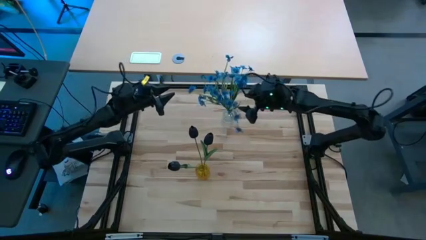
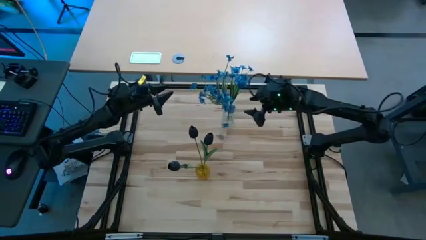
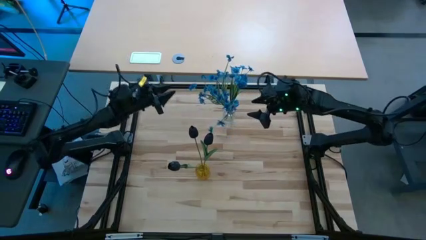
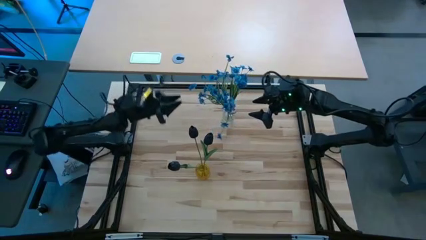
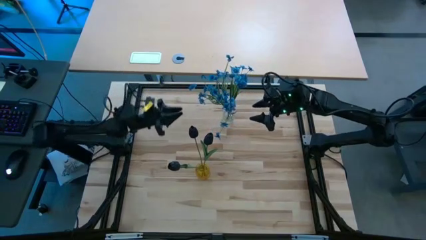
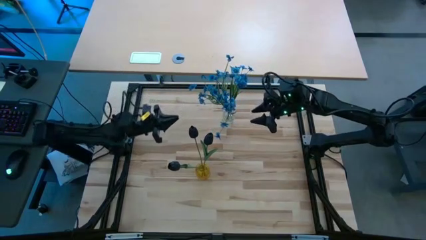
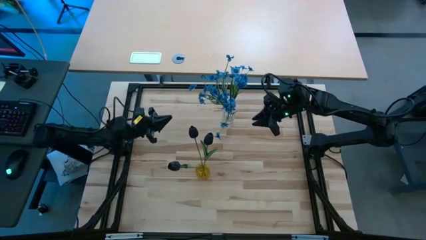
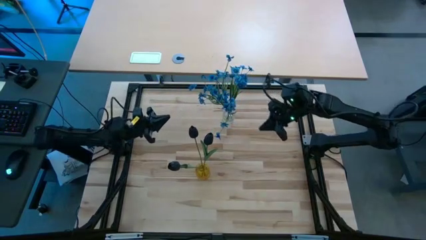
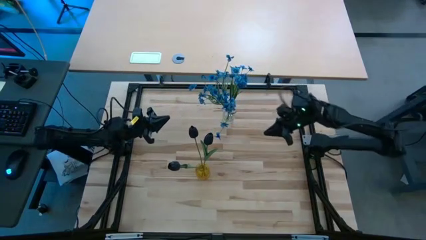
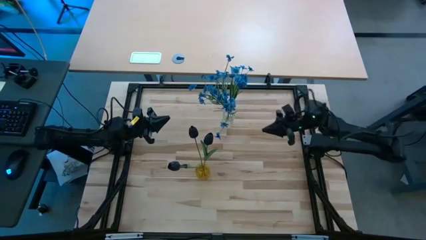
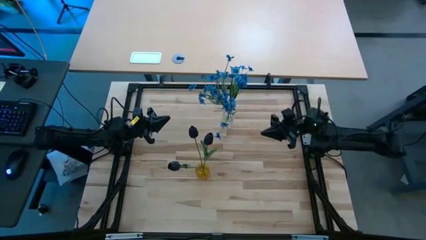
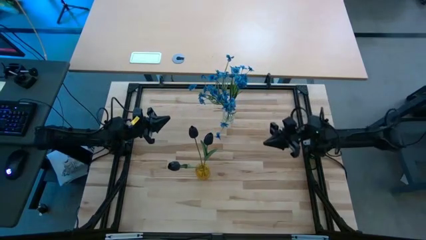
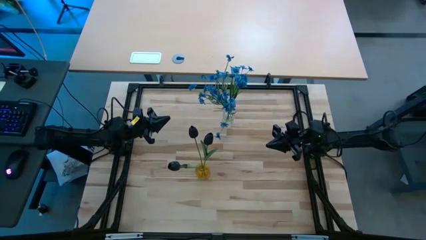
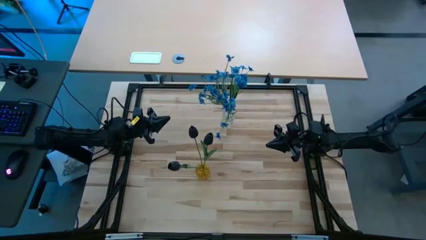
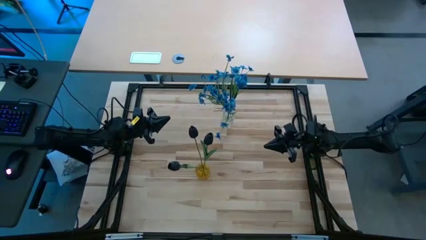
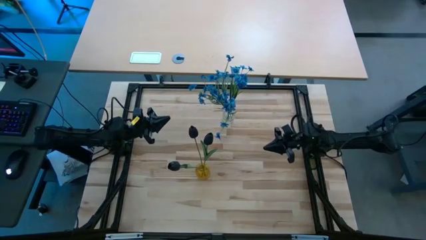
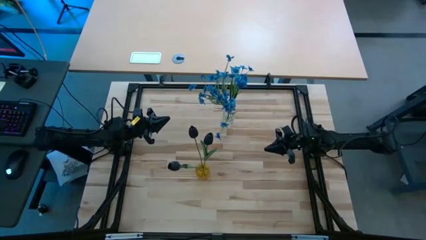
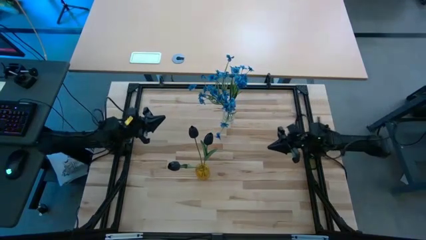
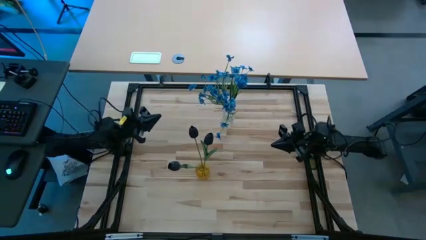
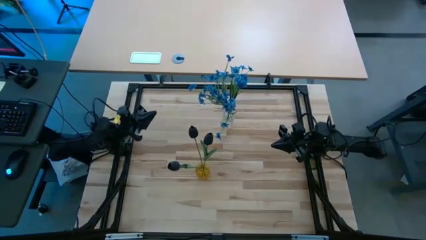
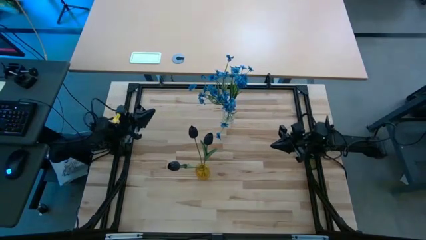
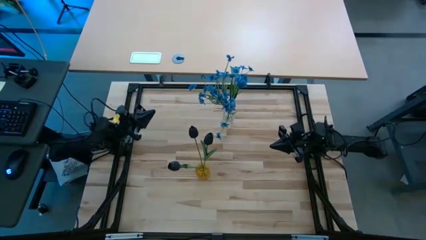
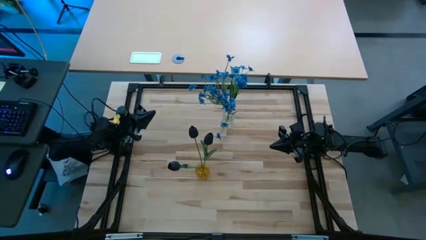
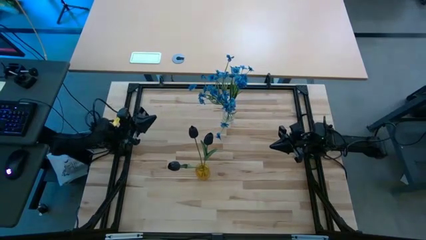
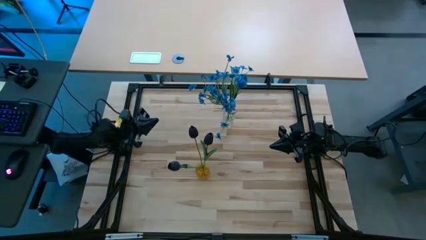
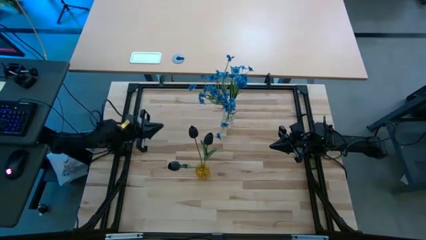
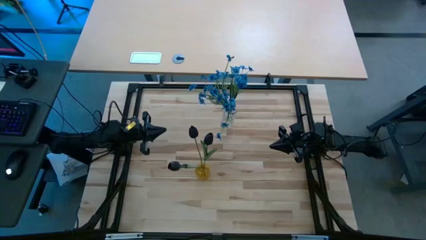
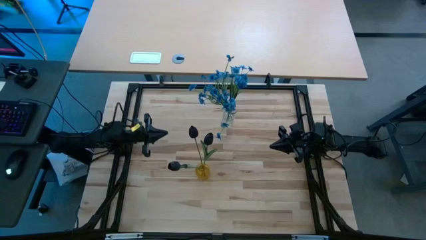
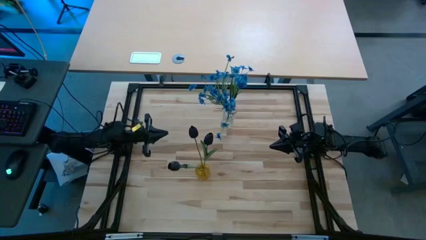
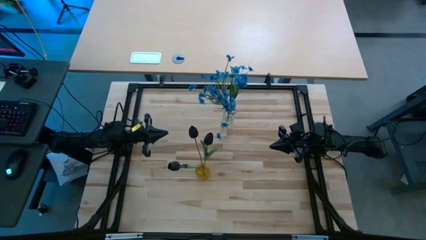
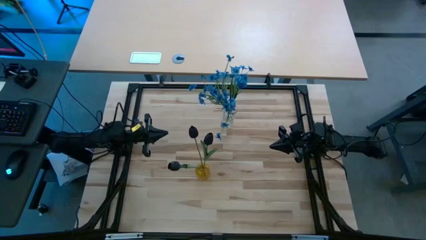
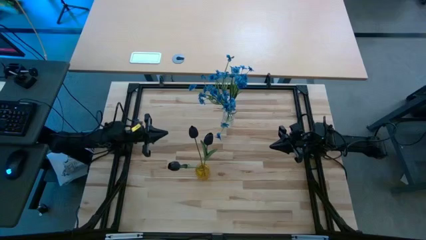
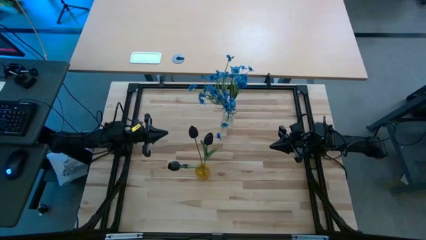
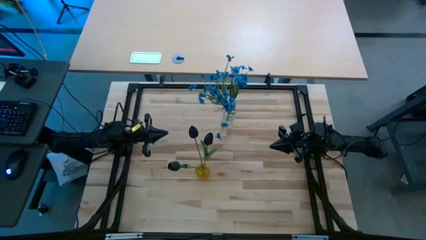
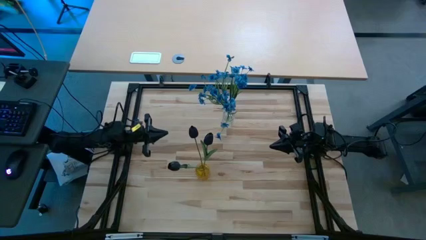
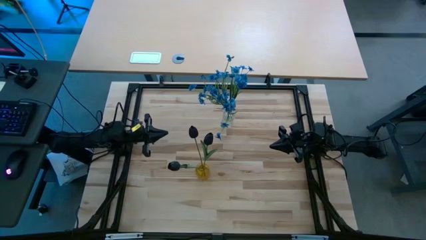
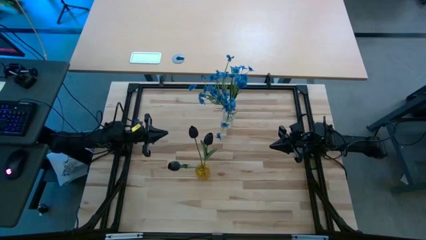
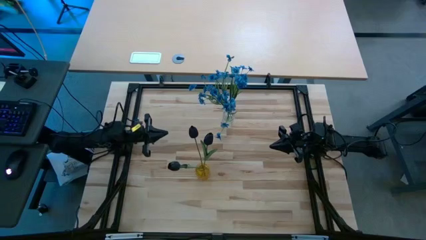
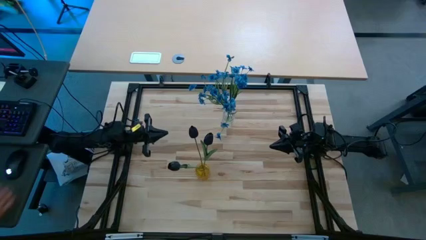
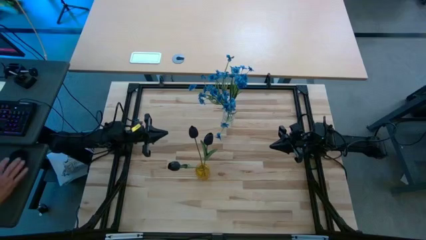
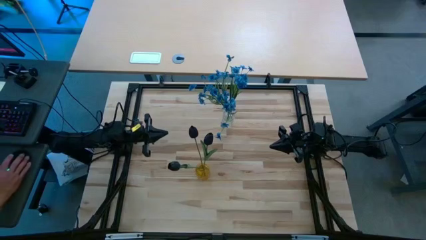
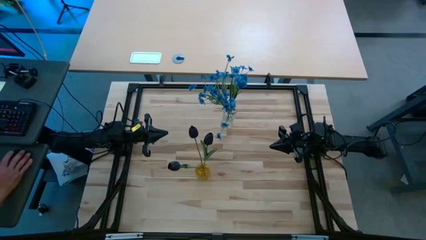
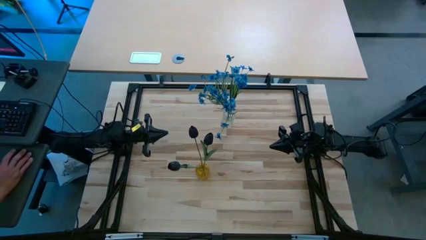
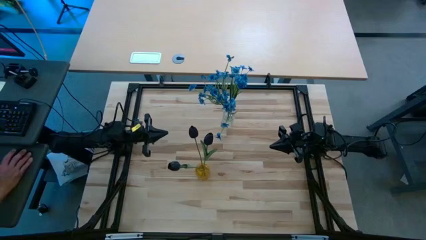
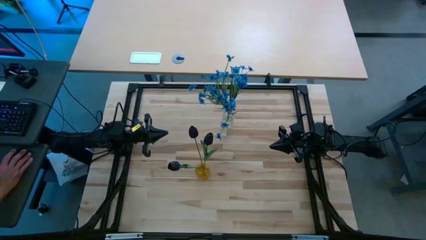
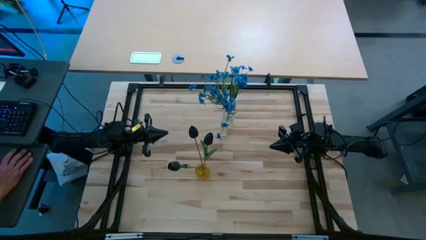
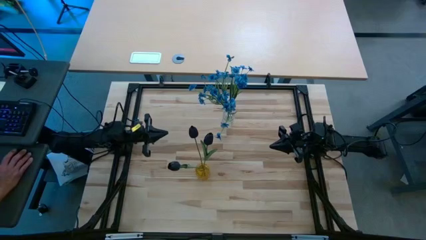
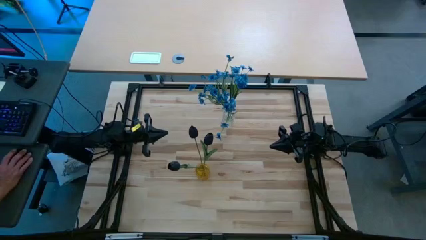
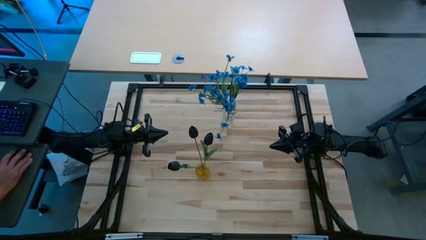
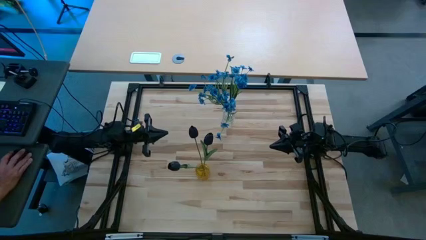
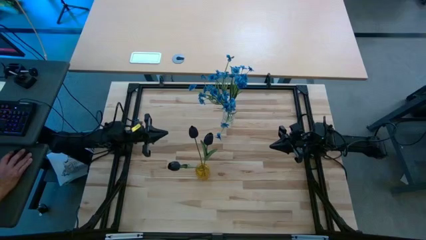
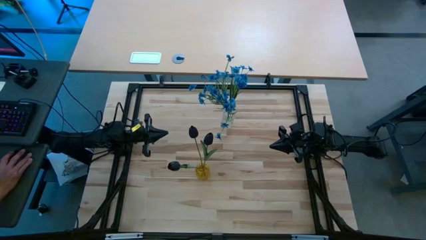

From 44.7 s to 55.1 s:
Task: Sort flowers into vase by color
Return to Home Position

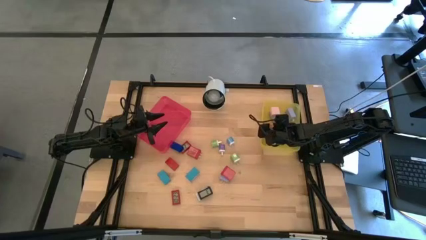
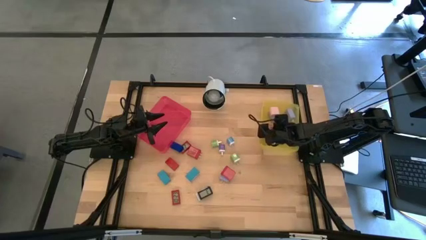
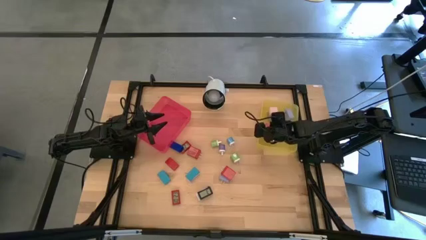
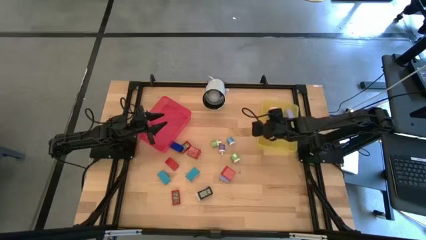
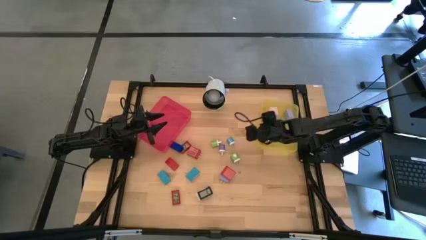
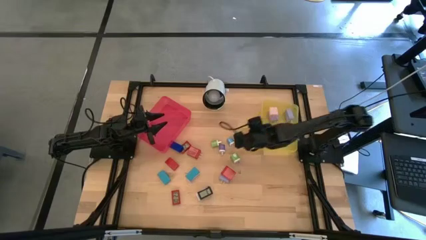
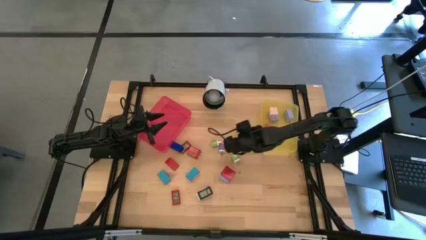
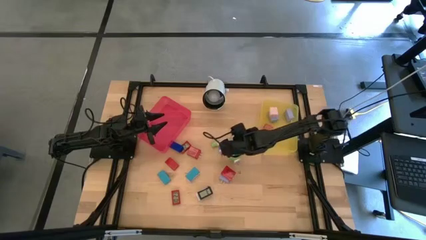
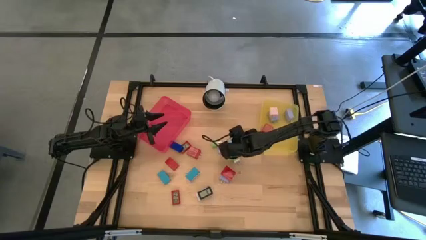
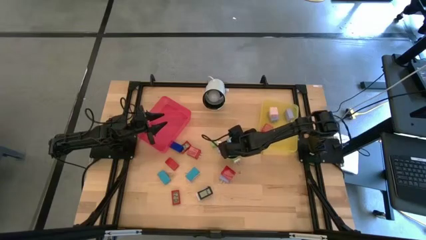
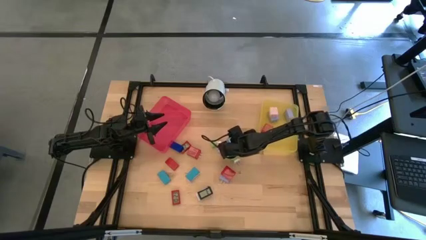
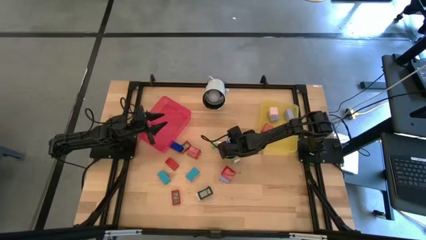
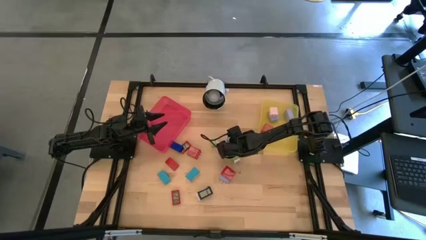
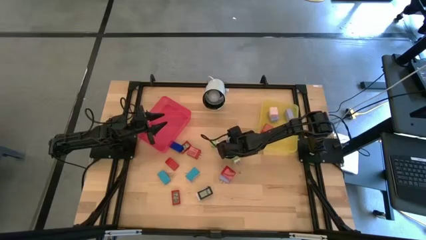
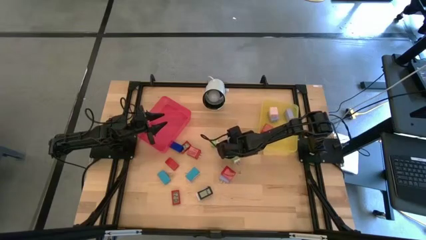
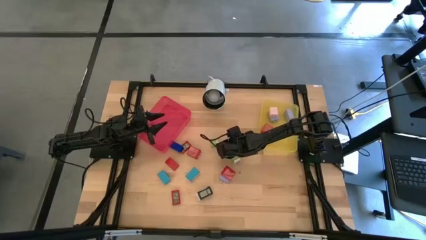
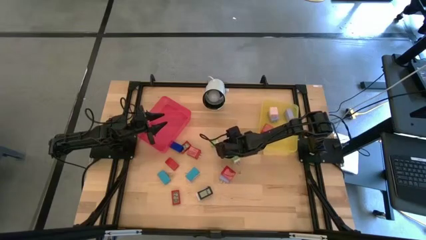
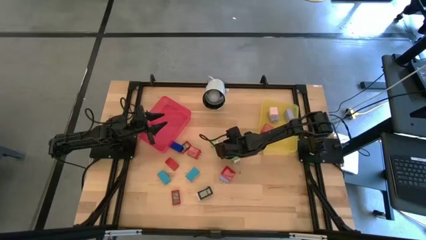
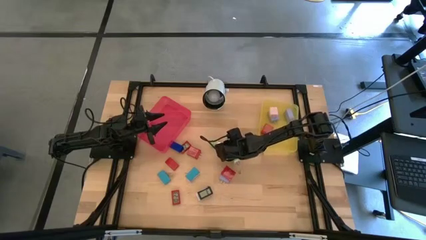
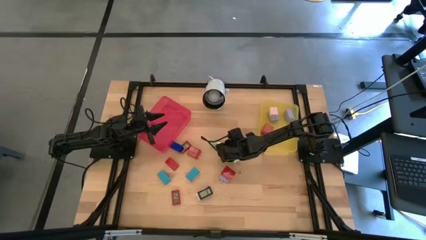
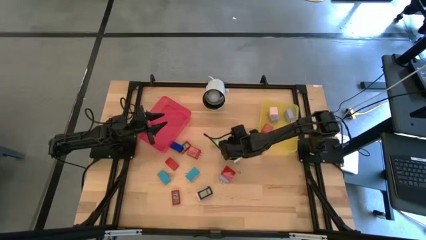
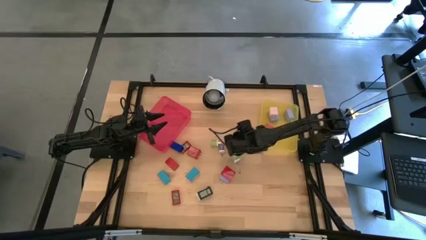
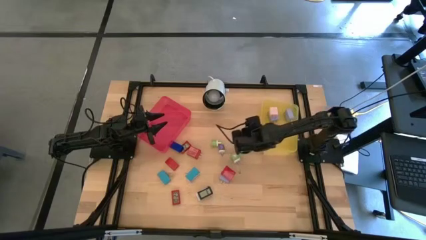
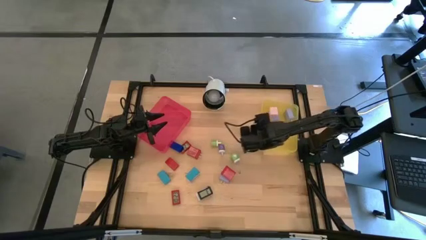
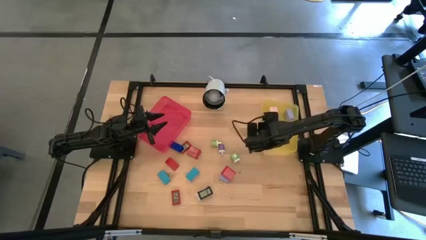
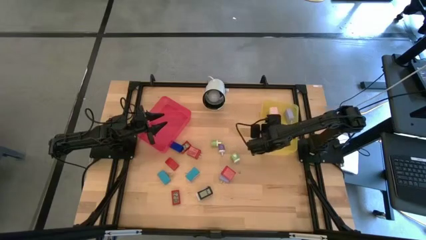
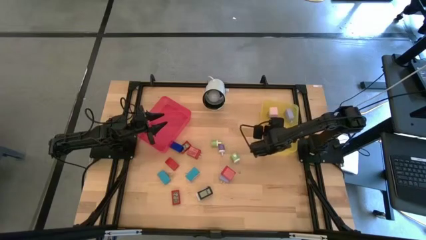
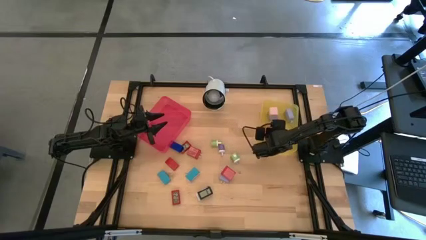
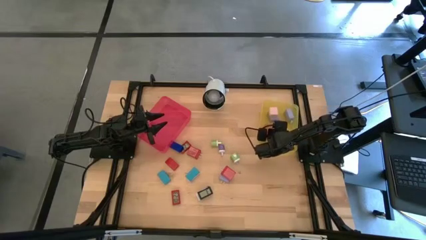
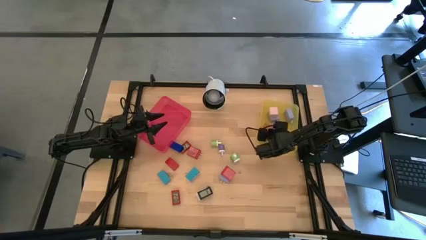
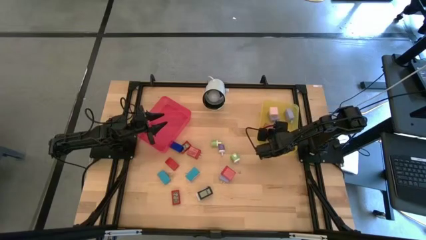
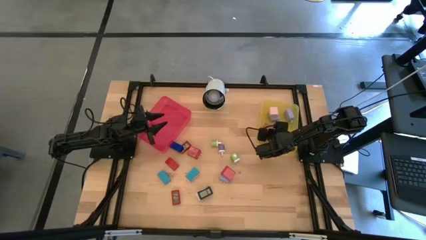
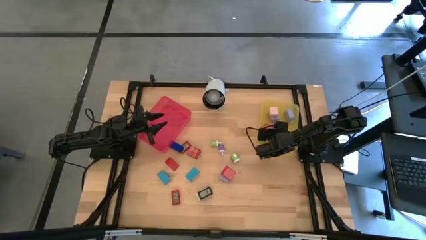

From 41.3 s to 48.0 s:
Task: Pick & Place Office items
Put the blue white charger adapter into the yellow bin

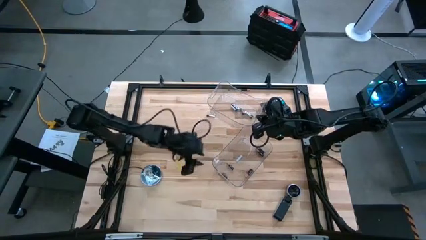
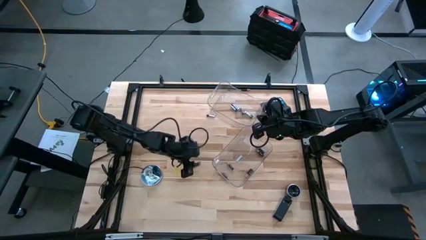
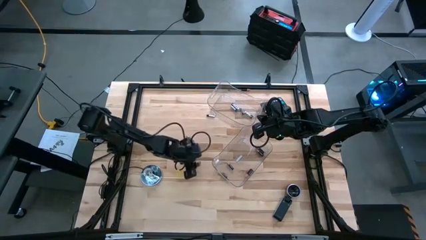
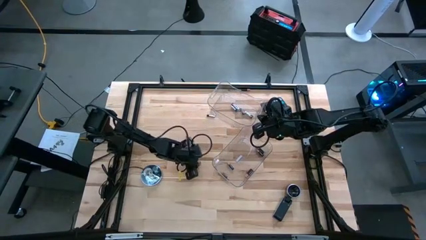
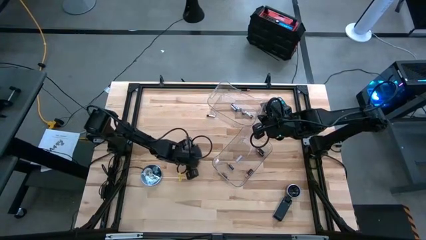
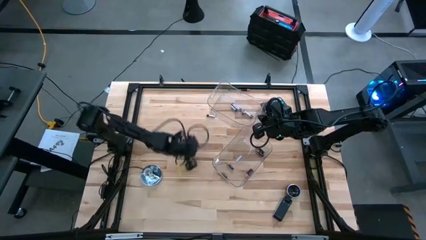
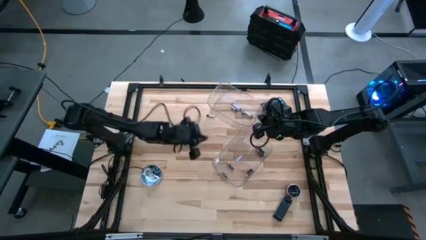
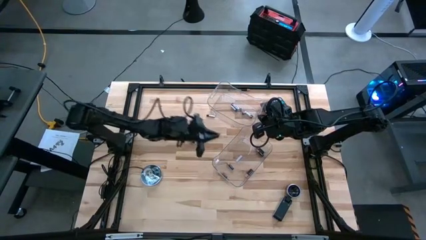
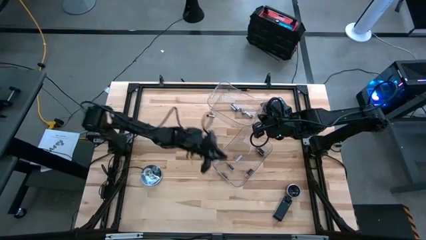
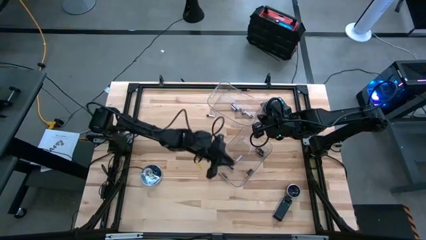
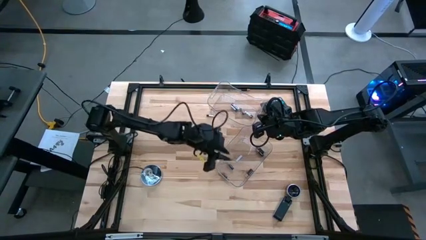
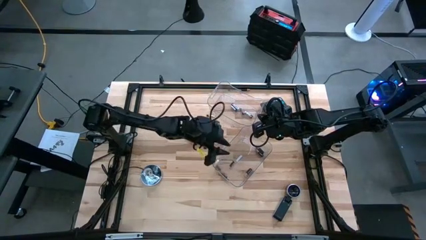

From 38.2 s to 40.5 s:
Task: Sort batteries
Put the black battery into the bottom transparent bin
